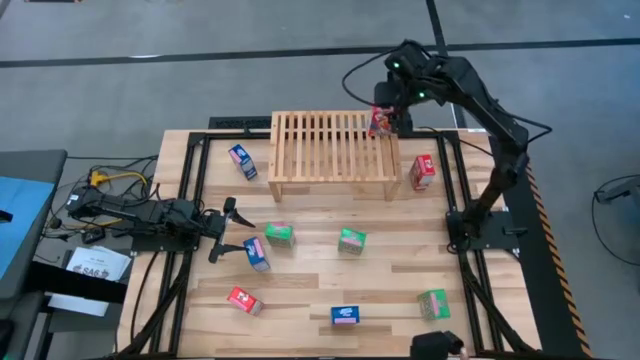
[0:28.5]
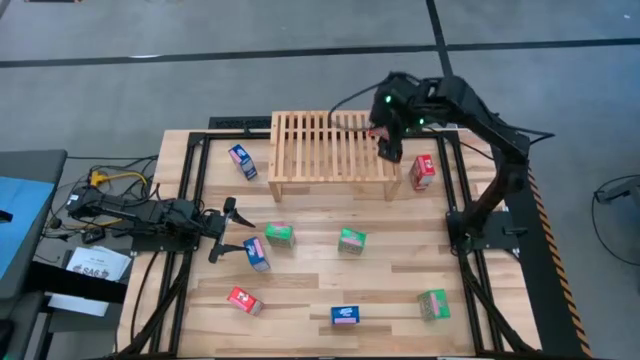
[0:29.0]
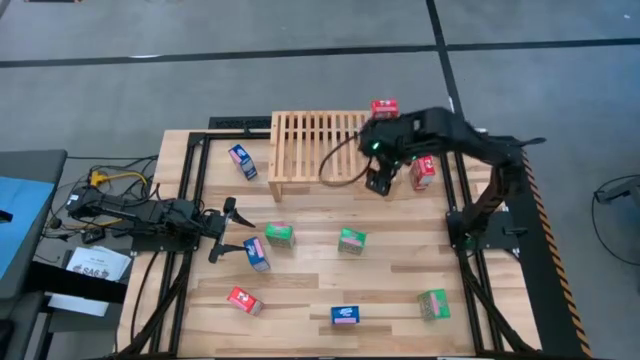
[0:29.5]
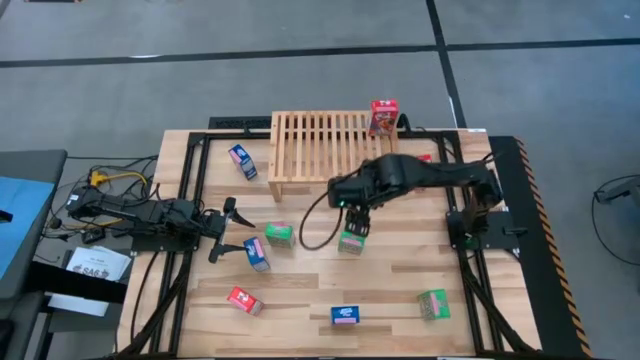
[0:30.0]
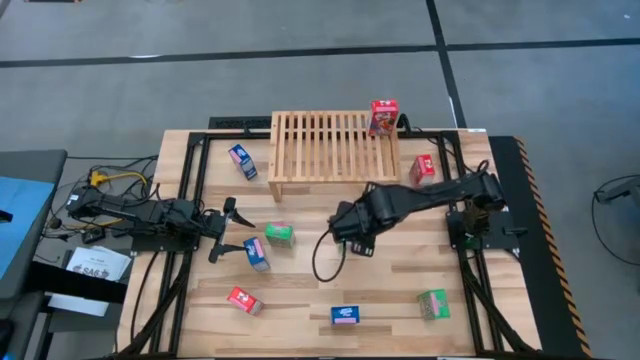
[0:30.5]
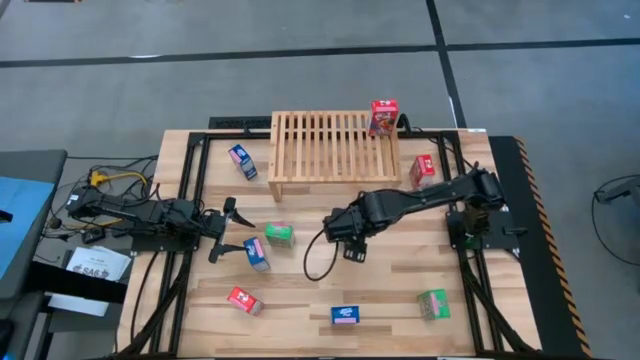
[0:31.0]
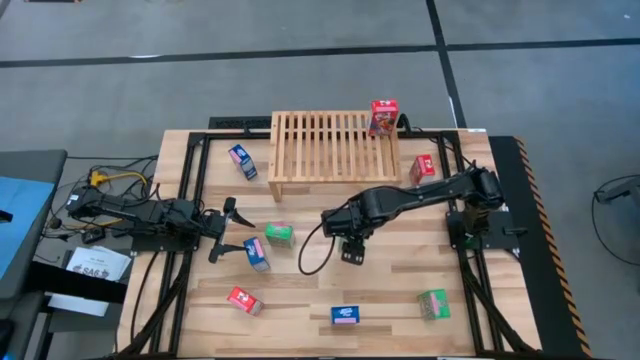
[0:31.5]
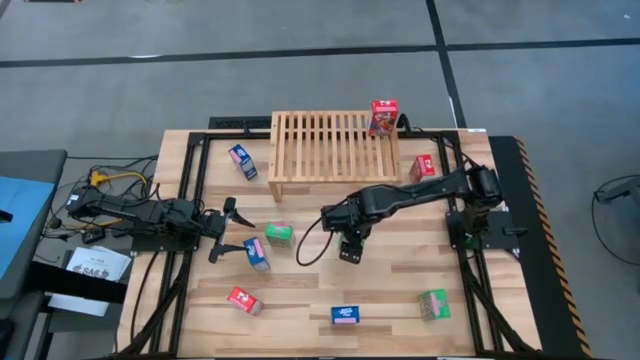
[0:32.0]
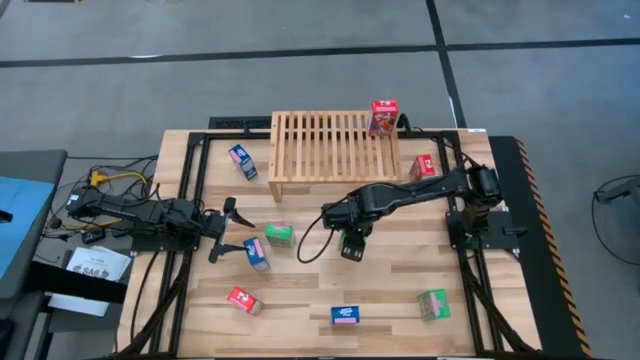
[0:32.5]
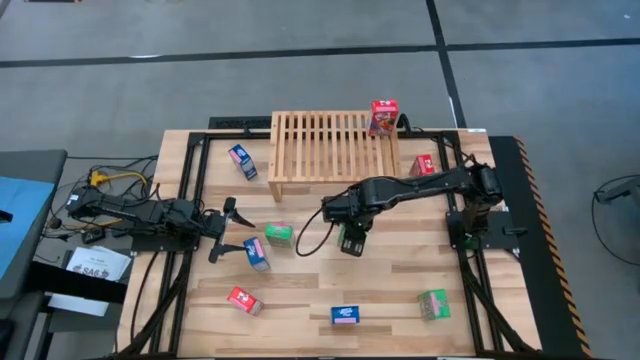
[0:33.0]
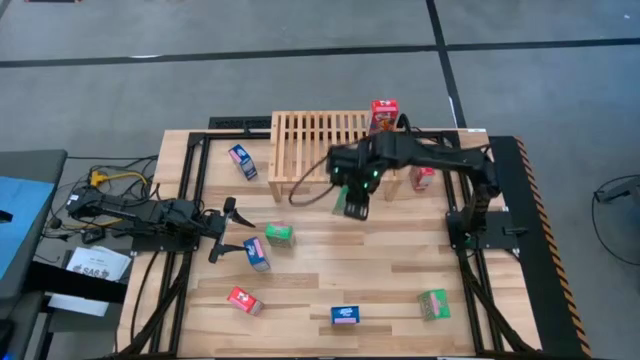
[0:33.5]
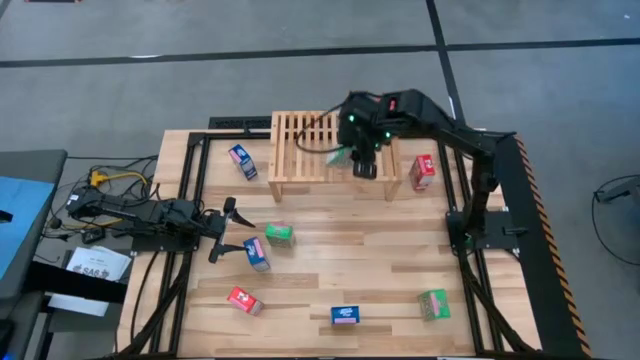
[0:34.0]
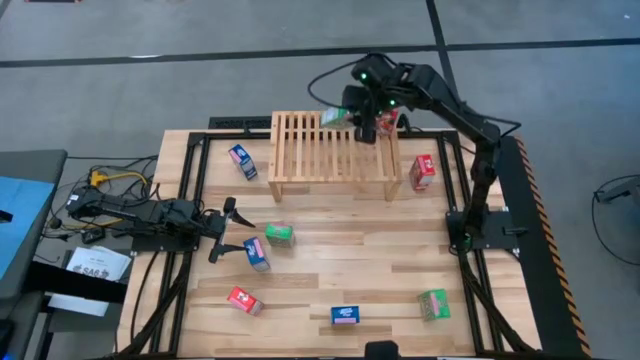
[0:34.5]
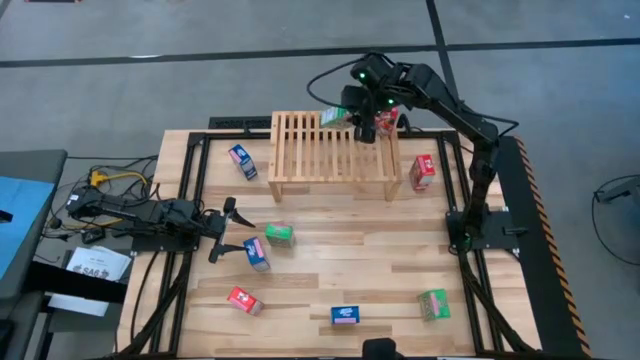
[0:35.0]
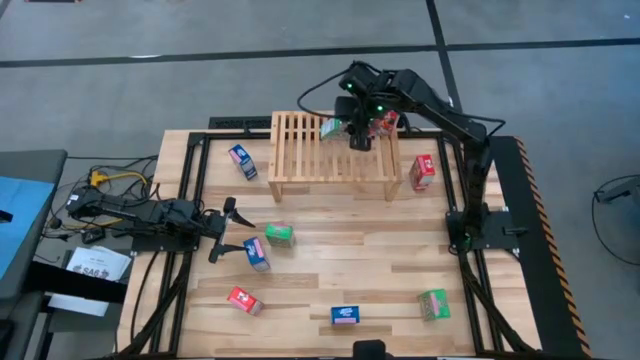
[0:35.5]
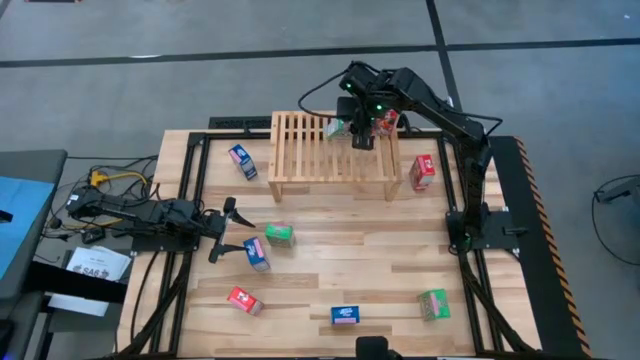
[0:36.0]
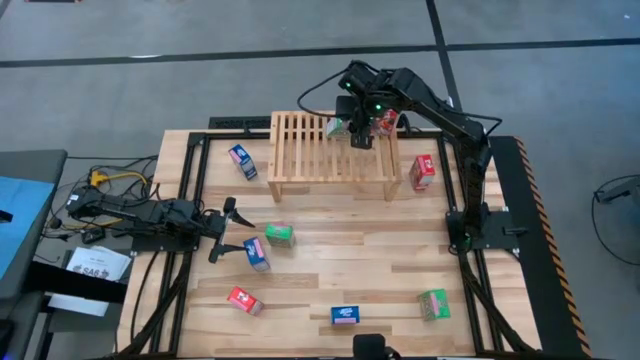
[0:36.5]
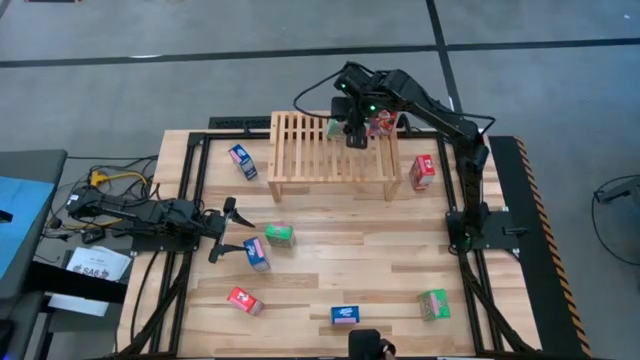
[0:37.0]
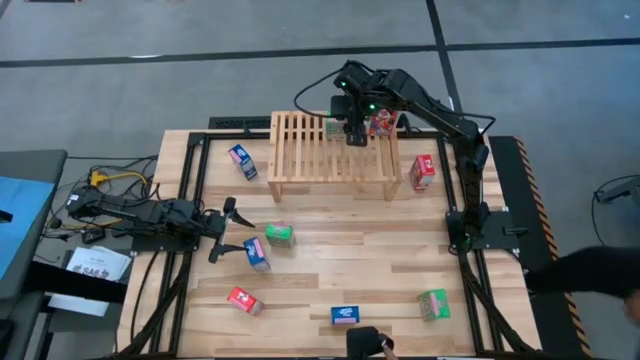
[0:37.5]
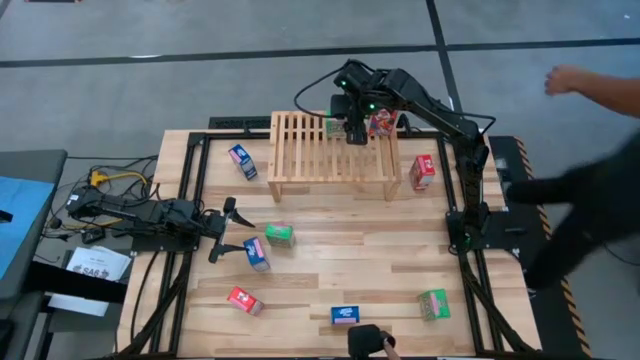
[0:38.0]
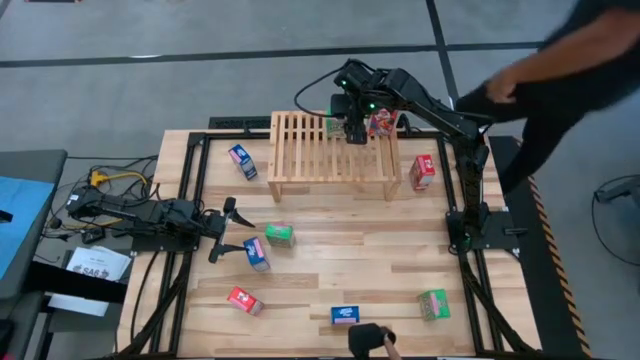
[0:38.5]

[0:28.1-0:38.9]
Task: Stack cereal on shelf
Put the center green cereal box on the shelf

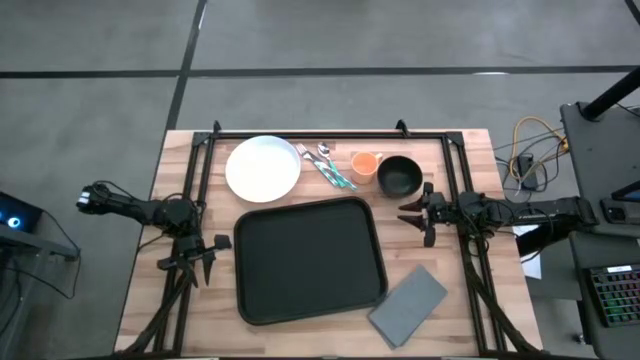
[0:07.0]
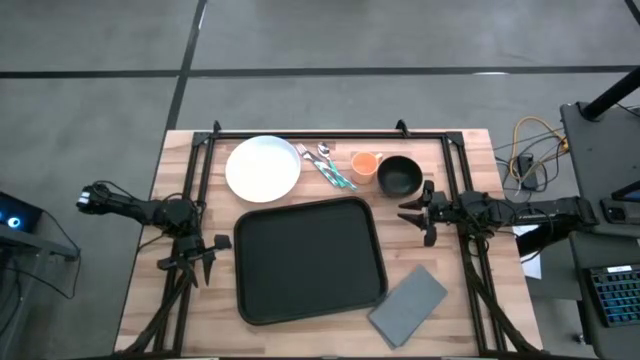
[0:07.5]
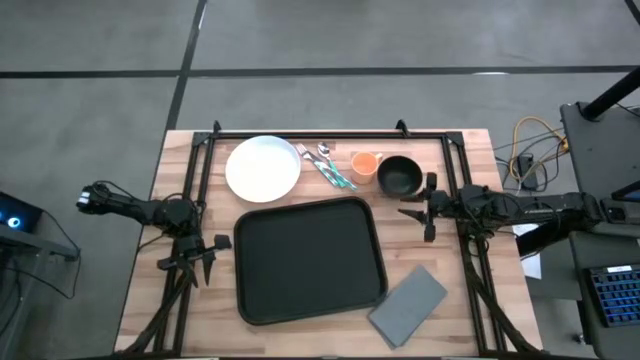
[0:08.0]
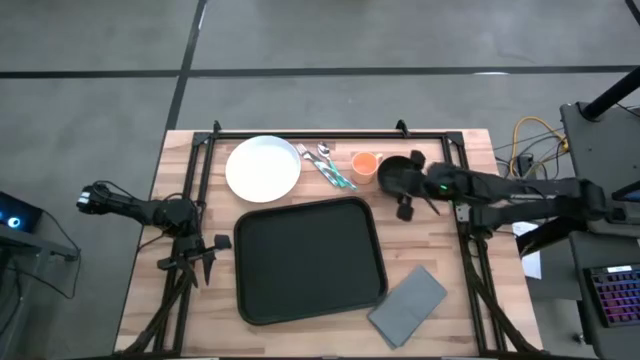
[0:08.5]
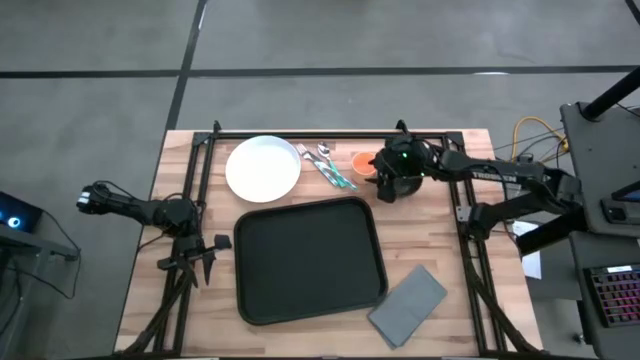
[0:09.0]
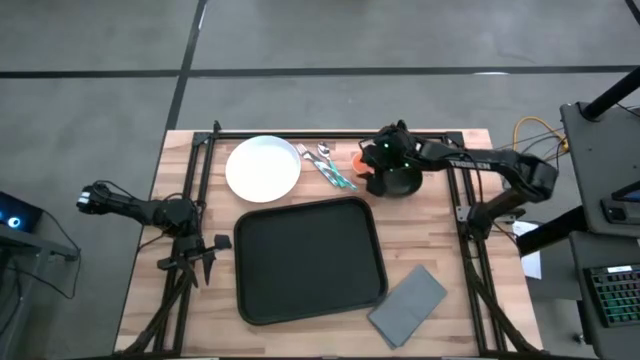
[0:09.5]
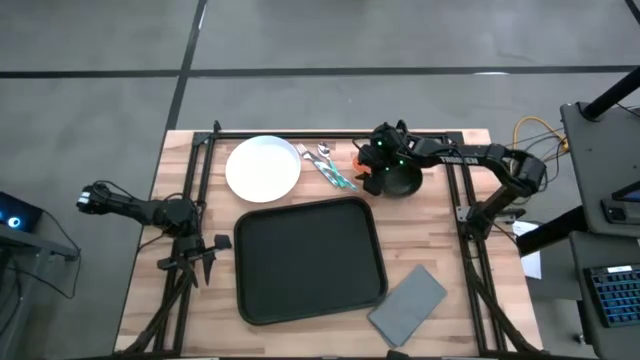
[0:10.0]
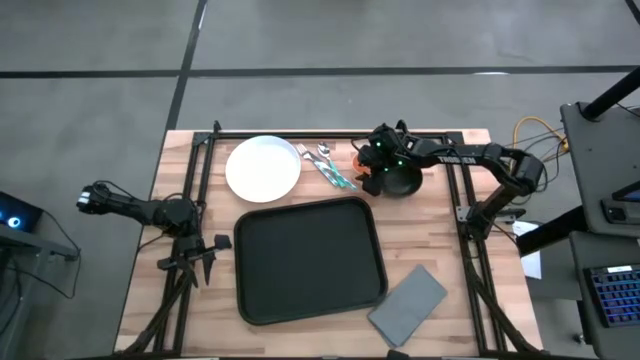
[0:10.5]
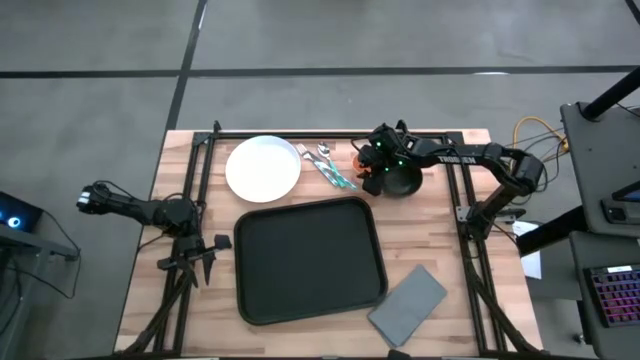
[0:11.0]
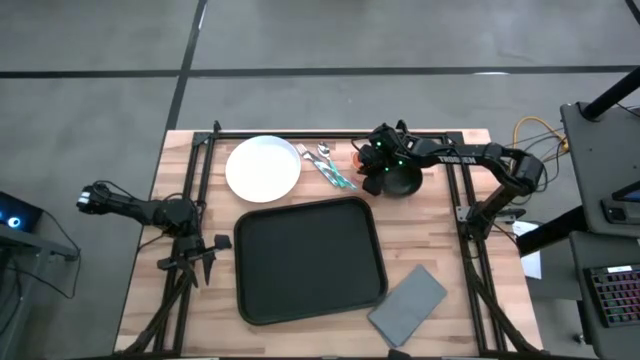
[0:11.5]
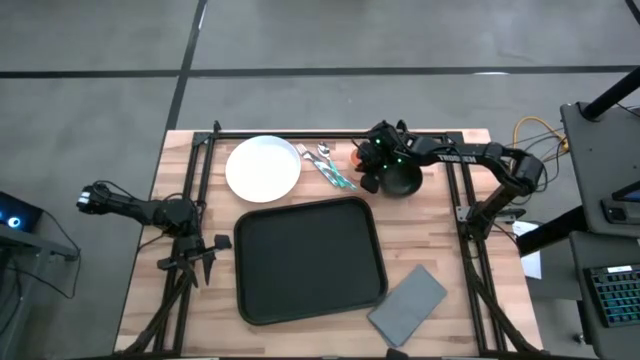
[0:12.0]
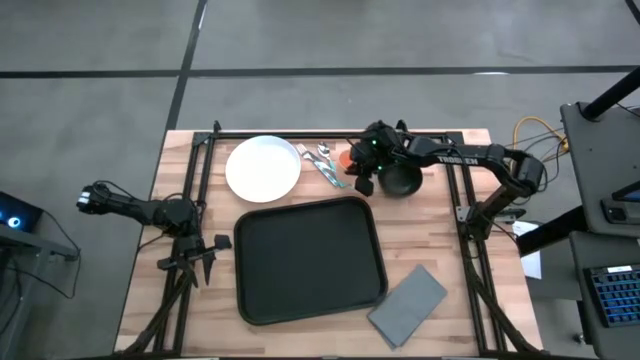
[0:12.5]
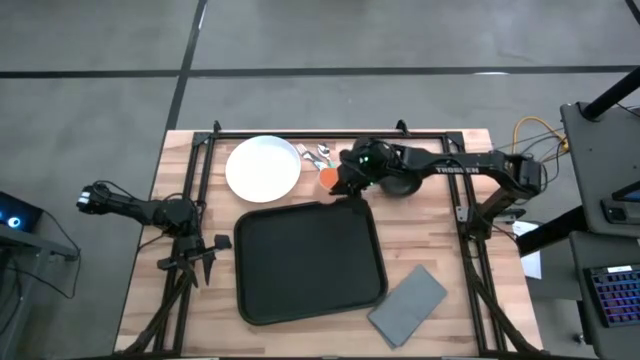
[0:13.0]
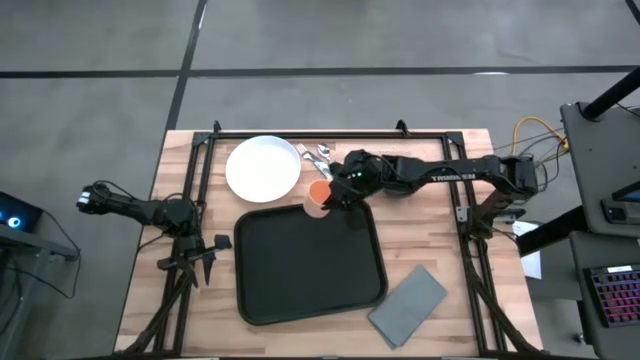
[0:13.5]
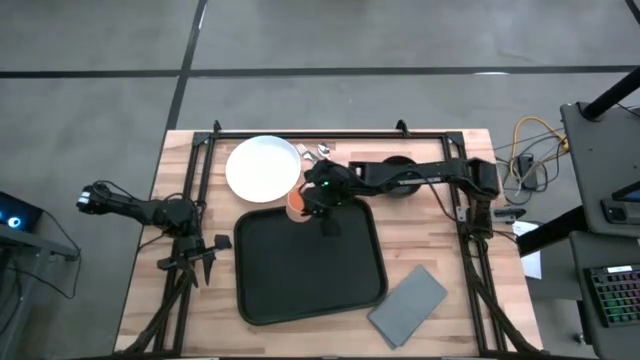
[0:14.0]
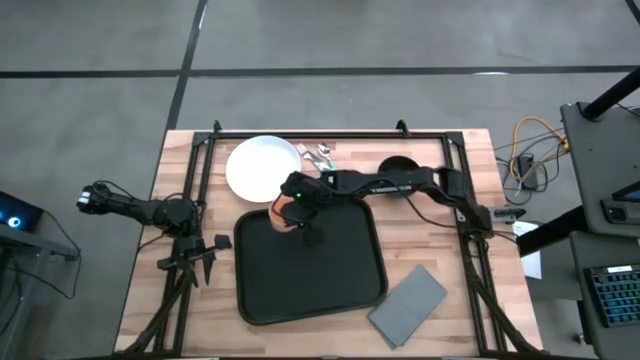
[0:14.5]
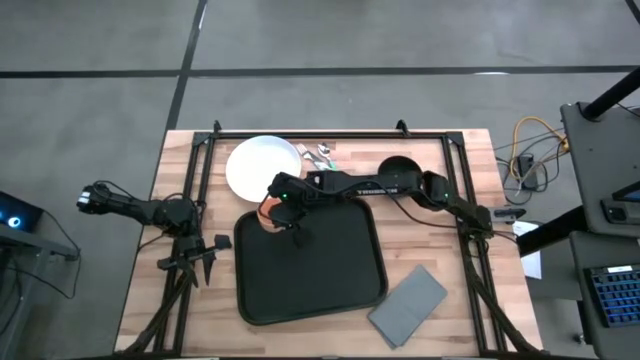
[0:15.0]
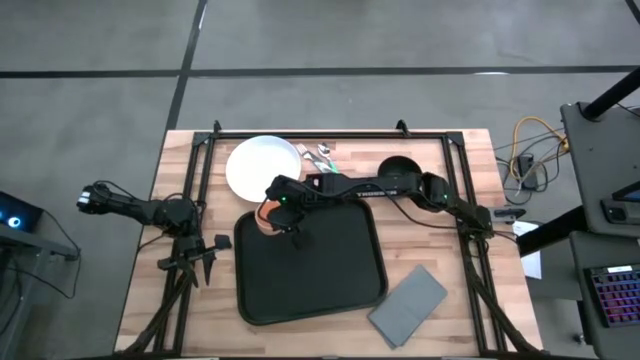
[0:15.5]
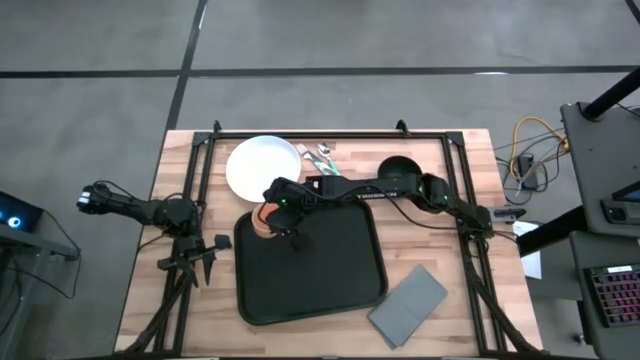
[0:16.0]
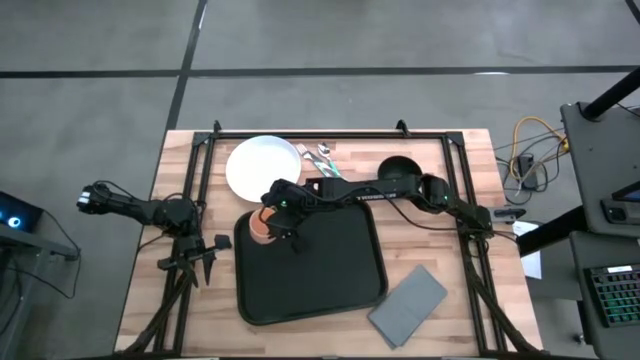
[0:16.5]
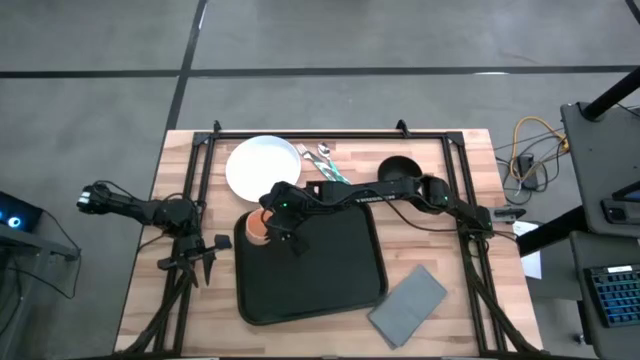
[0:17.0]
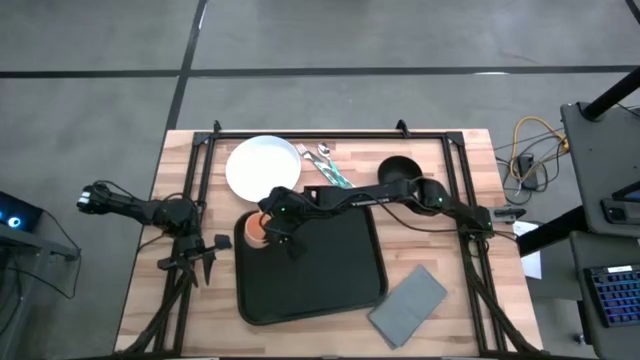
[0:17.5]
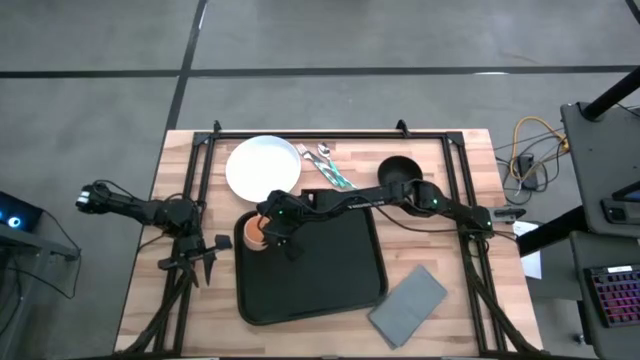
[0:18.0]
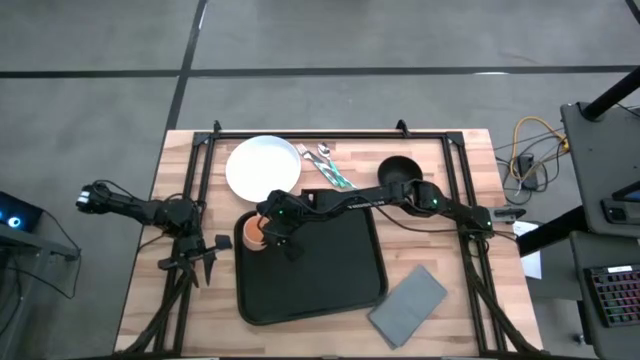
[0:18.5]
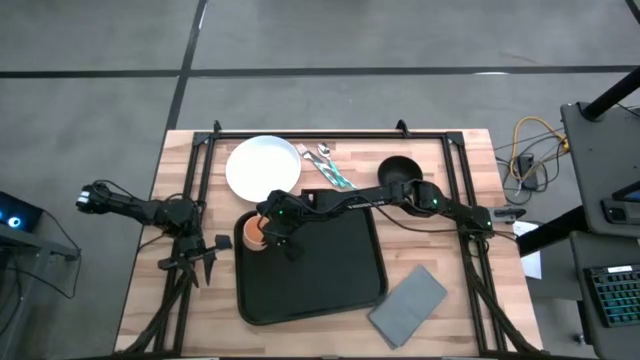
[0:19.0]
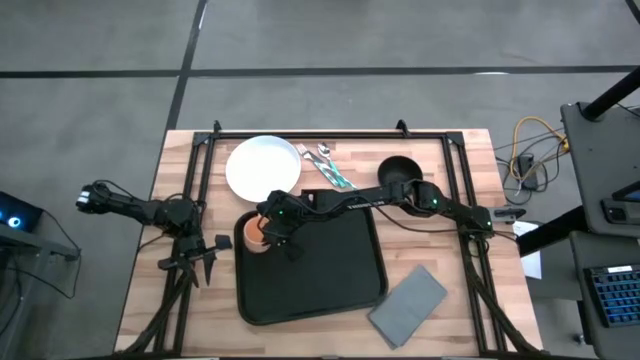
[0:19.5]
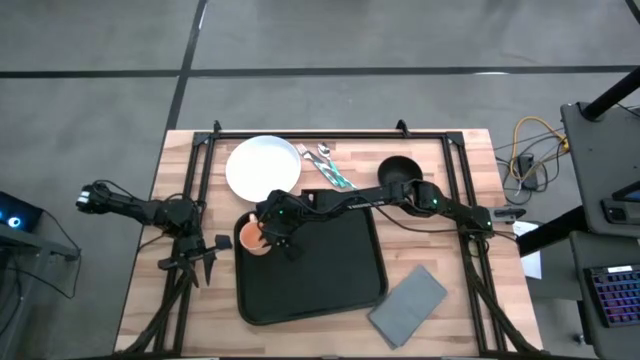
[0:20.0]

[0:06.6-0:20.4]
Task: Set up tray
Put the yellow mug on the serving tray
